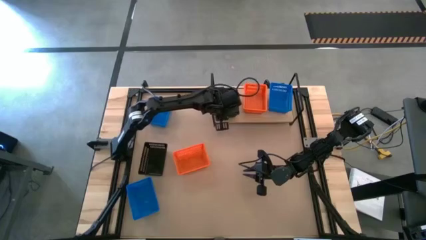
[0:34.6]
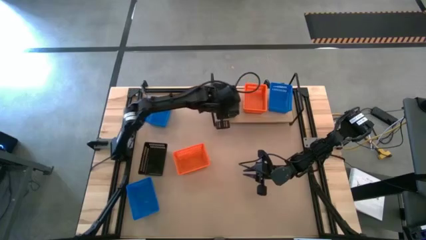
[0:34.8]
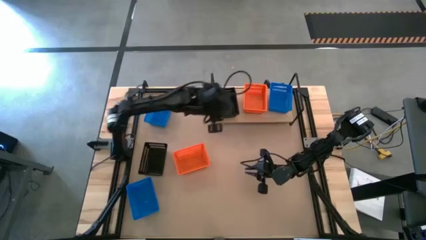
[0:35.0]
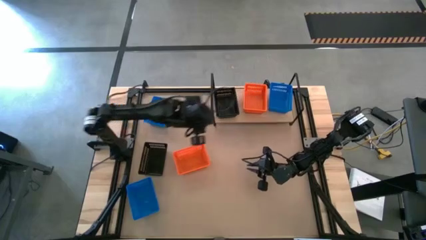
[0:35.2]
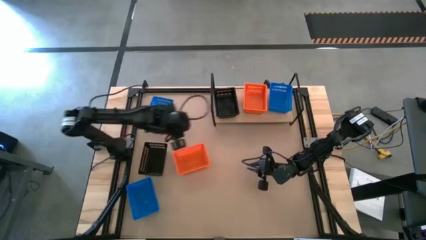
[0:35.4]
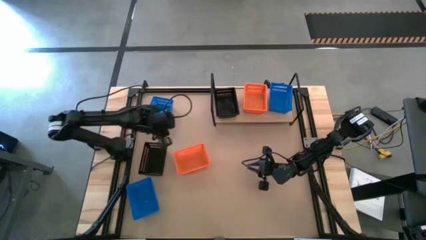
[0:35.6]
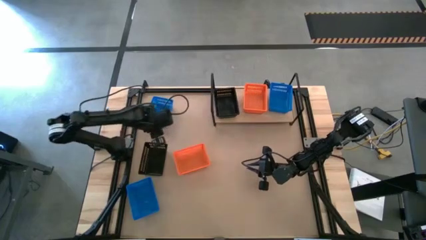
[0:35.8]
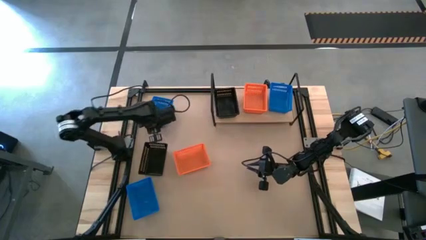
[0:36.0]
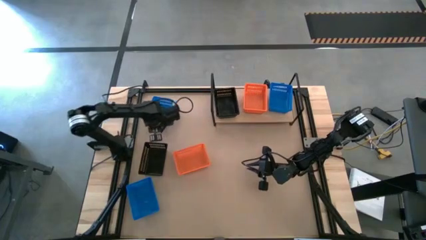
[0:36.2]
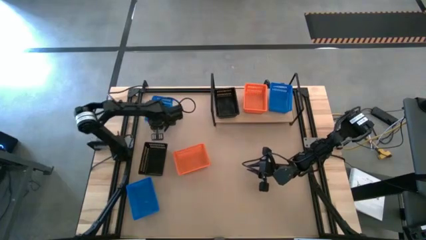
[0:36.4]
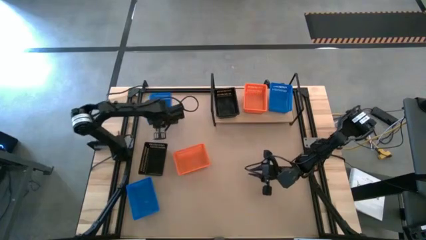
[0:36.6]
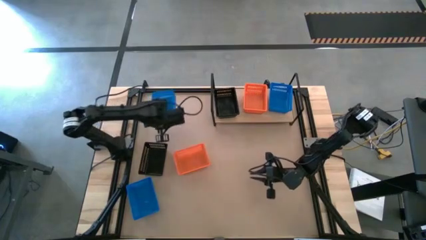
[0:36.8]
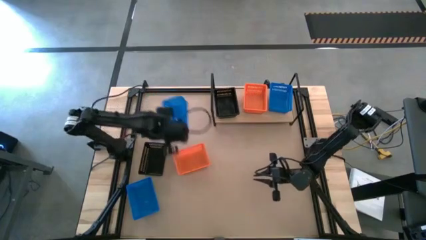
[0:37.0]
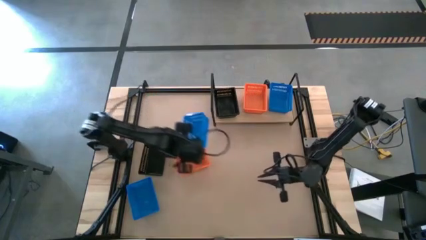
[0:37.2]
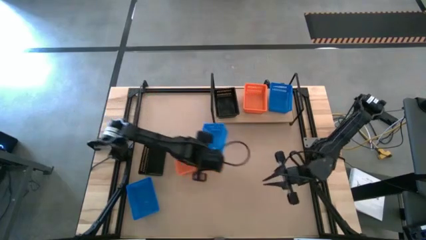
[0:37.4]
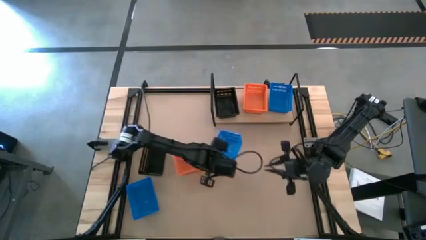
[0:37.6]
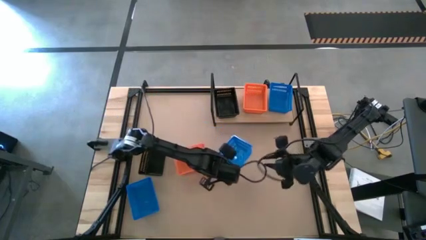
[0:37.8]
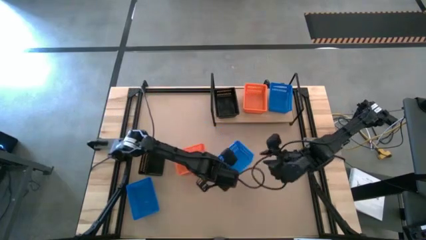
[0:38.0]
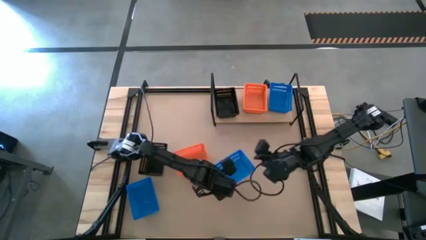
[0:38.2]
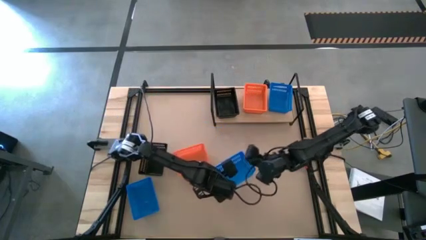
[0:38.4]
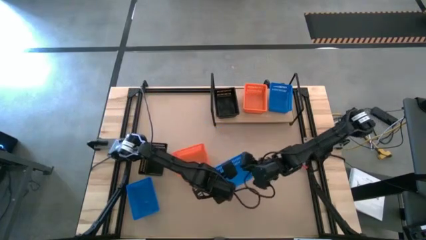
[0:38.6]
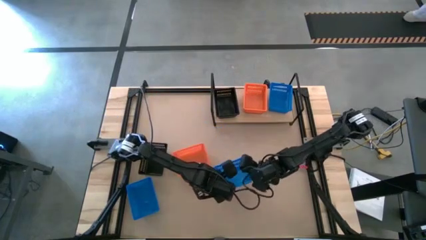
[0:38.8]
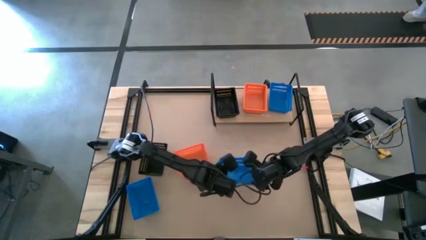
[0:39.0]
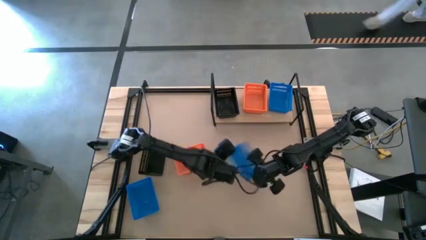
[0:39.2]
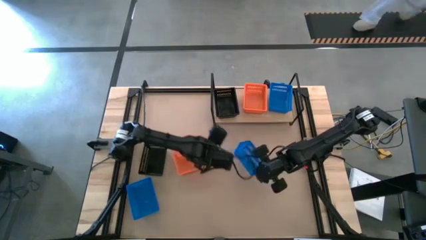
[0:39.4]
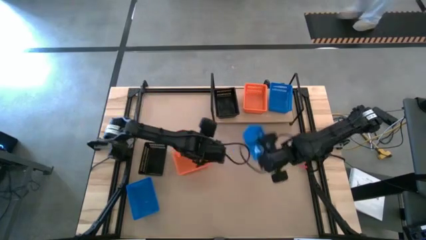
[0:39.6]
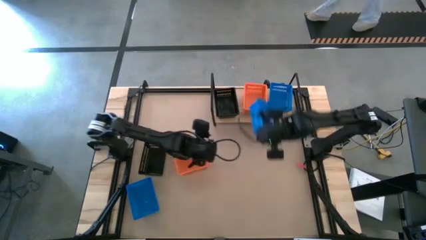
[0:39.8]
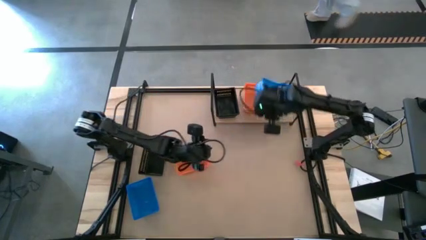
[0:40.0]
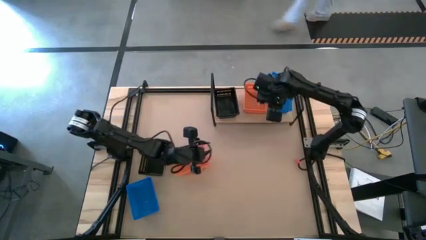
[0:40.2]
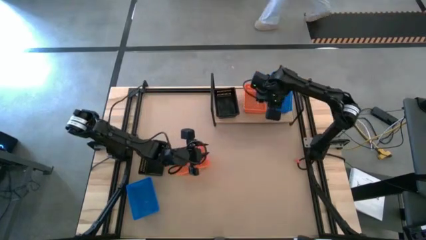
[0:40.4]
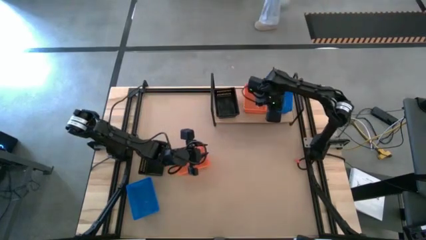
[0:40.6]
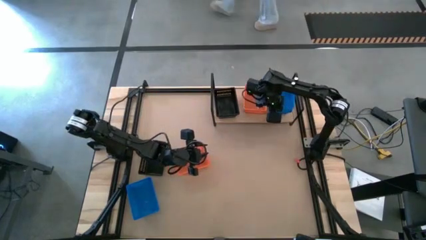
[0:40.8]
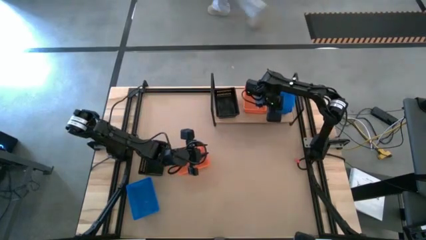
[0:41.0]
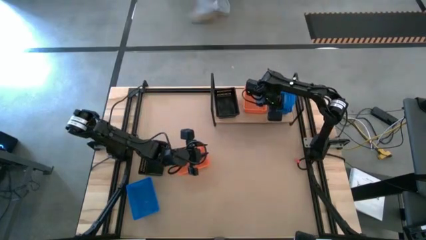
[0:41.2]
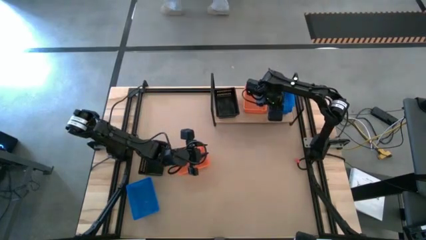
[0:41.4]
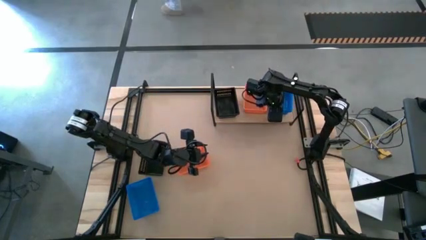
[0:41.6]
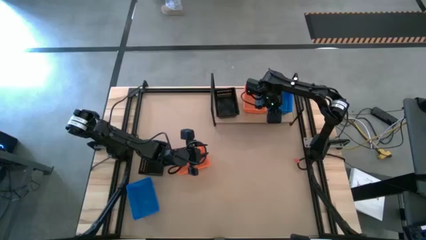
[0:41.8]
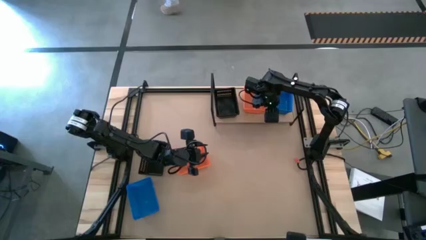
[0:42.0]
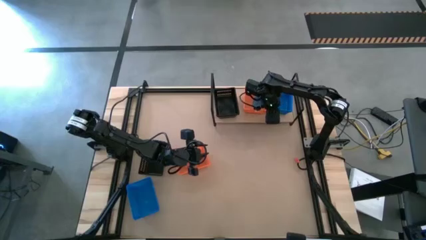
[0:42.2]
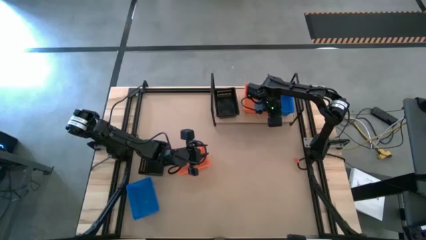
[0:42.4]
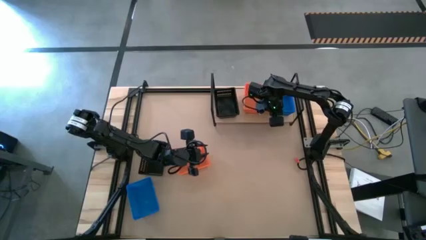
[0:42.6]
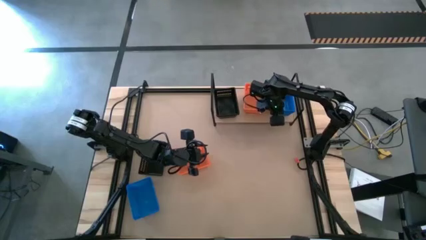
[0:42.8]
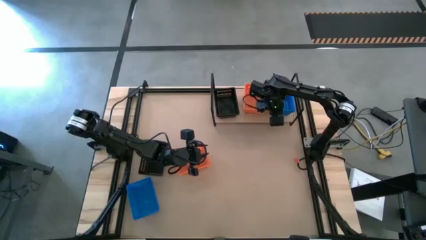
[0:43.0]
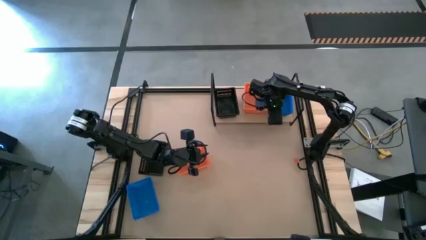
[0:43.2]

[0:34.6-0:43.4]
Task: Stack baskets on shelf by color
Stack the top blue bin on the blue bin on the shelf

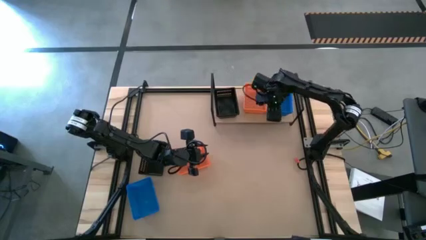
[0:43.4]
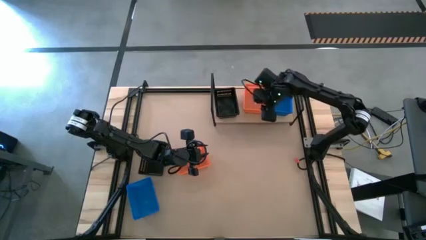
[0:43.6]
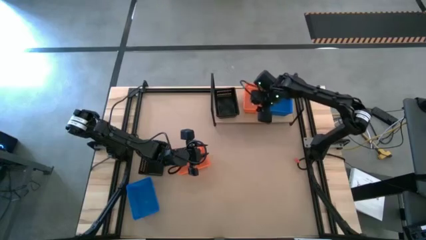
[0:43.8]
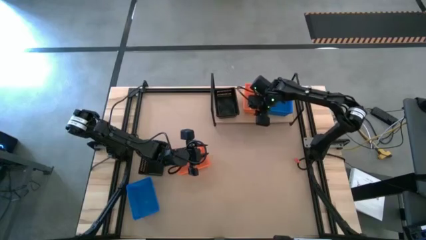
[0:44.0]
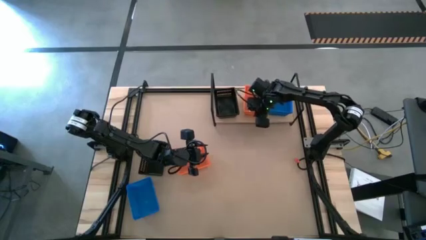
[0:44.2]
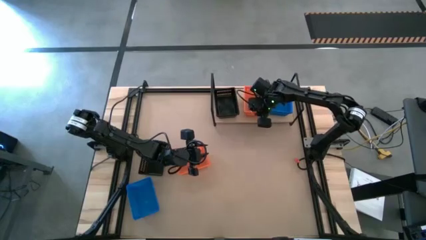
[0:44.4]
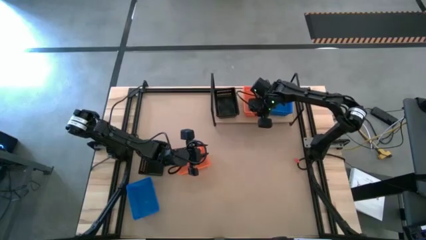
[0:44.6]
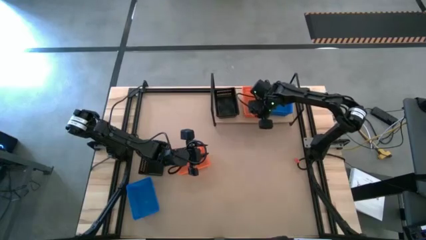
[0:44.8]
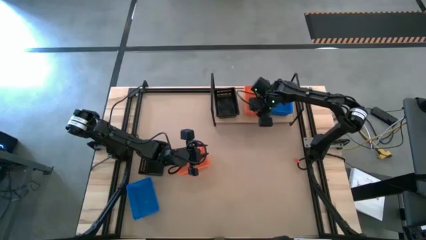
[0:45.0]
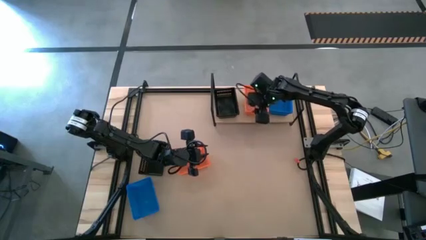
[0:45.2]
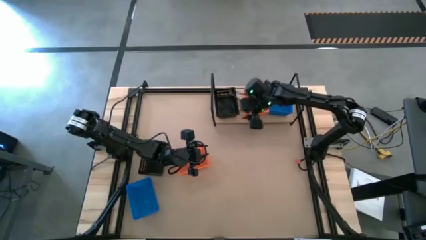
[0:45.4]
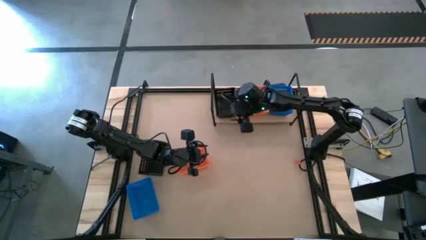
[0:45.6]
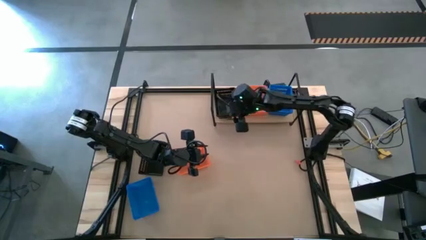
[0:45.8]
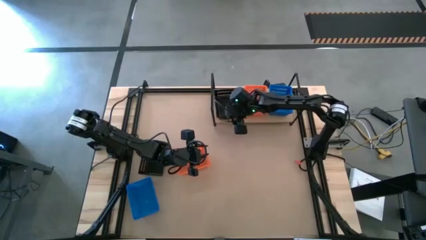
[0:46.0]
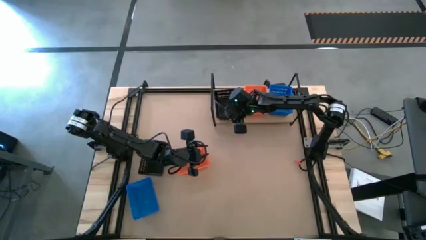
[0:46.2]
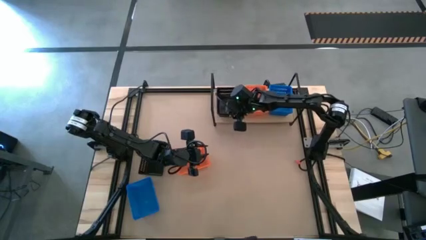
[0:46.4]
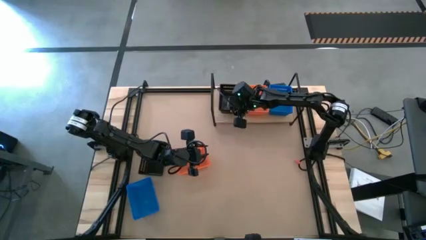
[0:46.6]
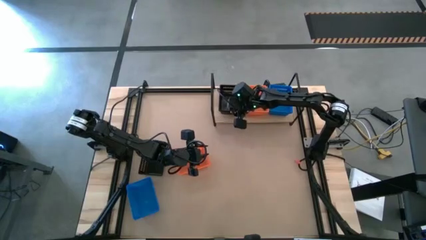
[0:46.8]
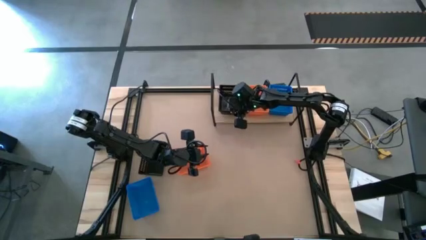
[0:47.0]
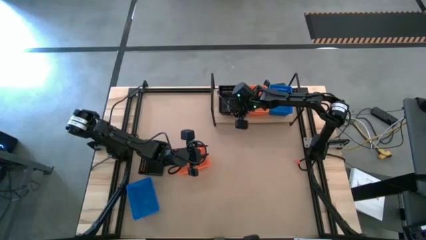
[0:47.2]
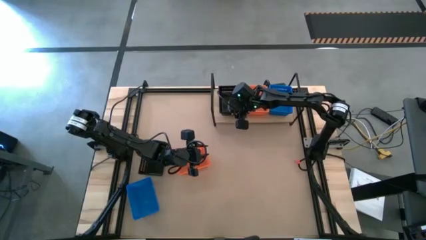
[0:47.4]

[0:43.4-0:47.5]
Adjust the stacked bins on the shelf

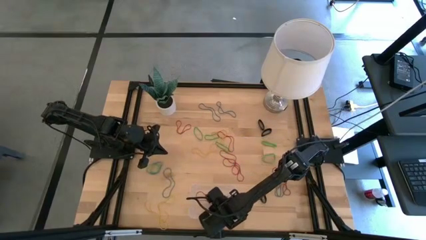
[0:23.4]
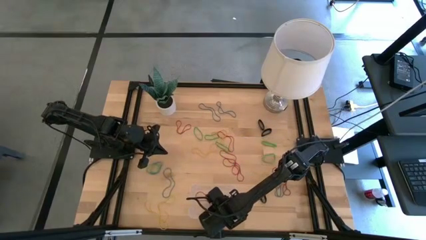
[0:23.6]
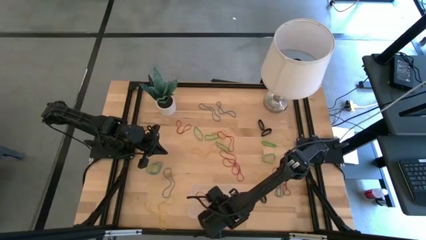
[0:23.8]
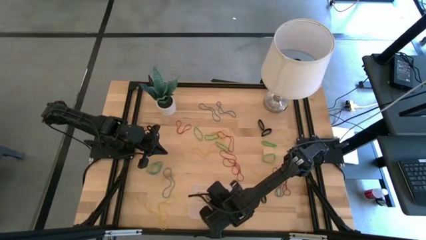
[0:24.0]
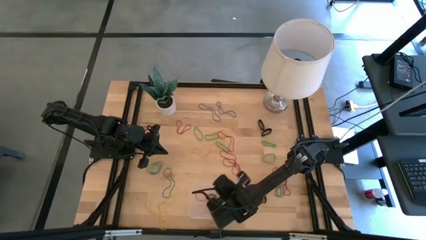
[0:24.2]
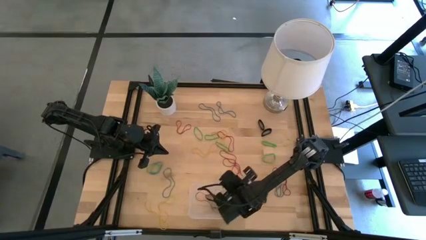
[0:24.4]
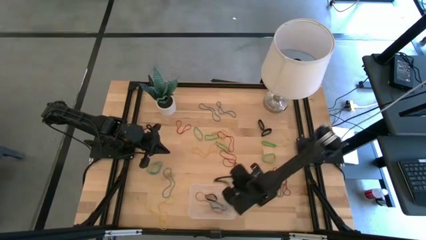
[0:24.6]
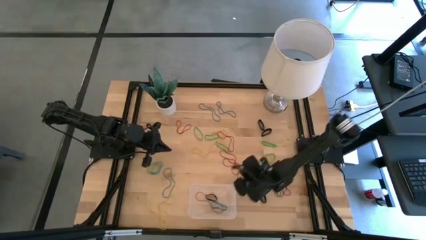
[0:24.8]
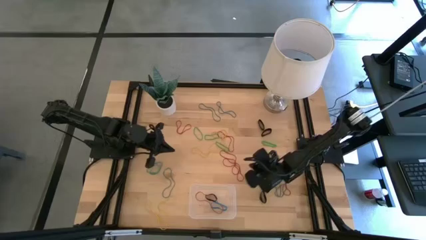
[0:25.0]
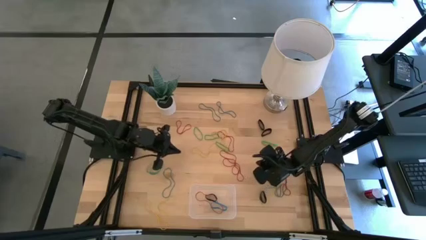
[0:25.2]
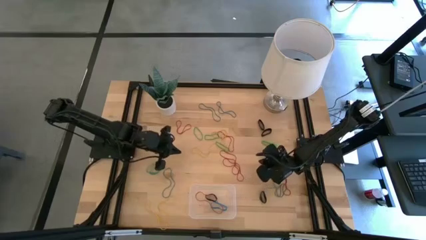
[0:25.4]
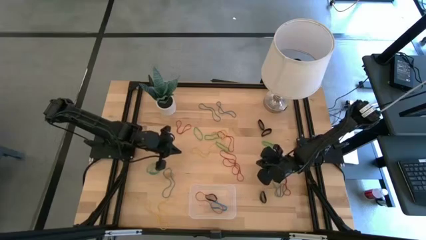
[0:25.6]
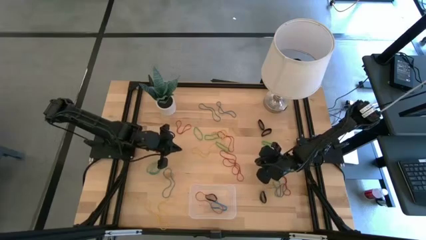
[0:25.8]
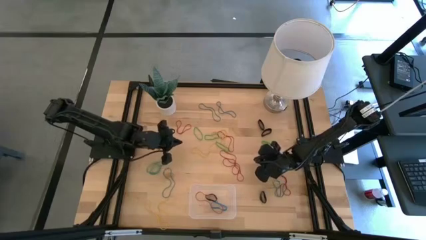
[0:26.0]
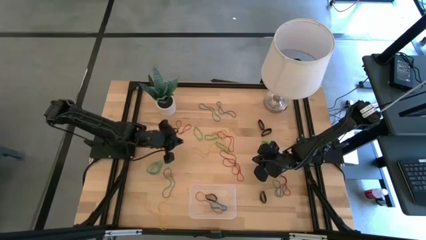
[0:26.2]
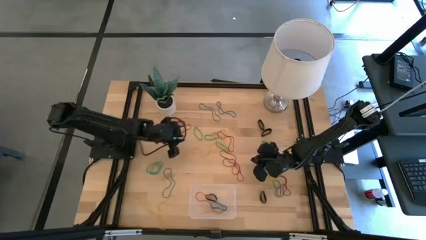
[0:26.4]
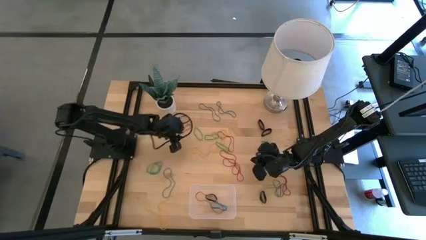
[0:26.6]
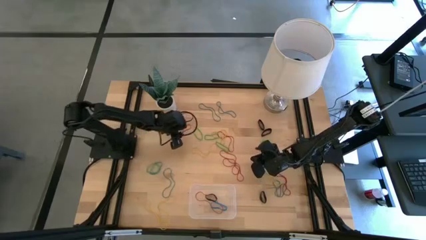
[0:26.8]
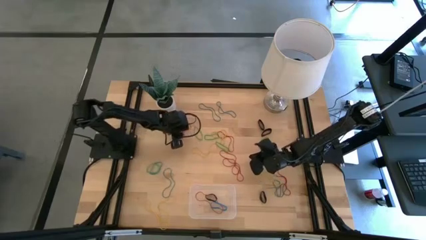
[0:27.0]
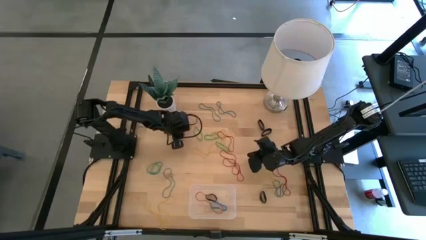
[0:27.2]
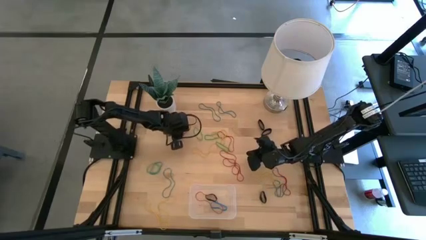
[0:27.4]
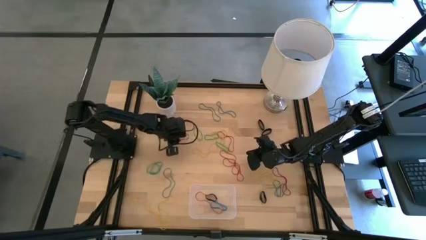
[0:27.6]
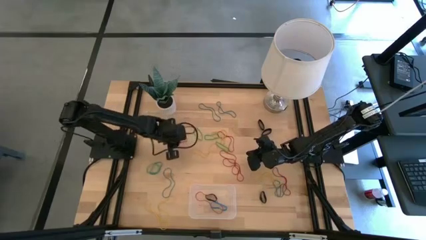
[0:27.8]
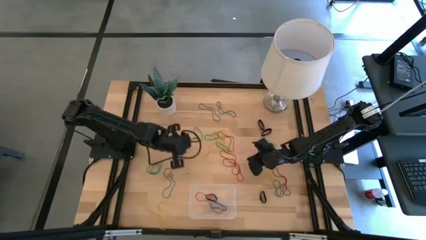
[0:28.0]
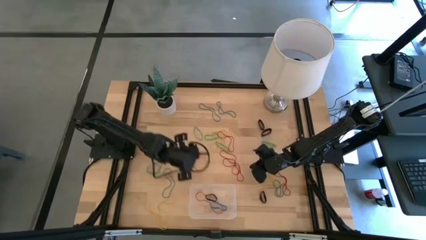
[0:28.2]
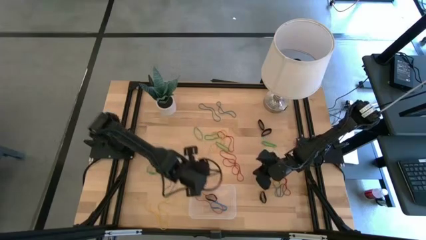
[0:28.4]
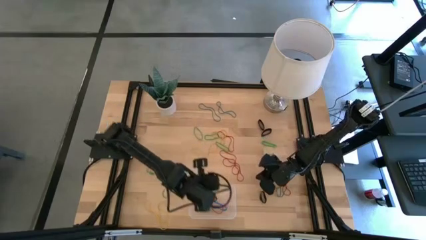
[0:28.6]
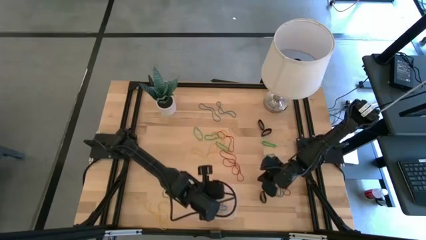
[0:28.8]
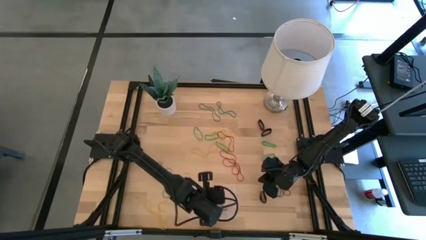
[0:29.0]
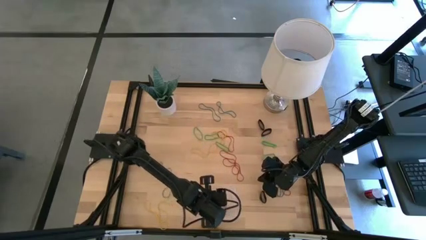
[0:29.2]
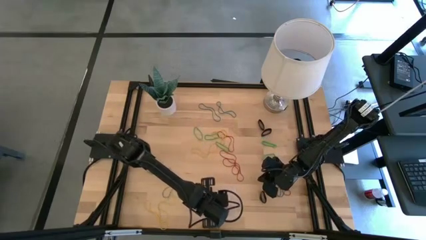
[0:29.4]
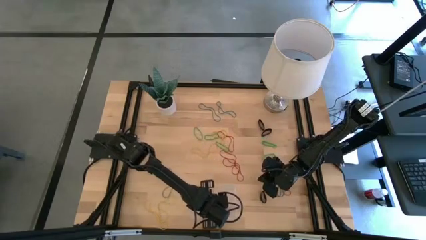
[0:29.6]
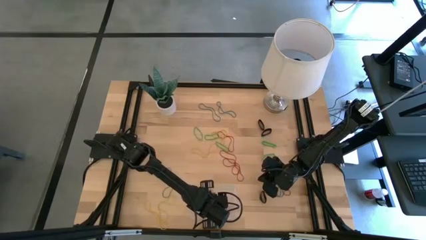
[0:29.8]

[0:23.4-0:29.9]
Task: Pick and place rubber bands into bin
Put the red rubber band into the transparent bin
